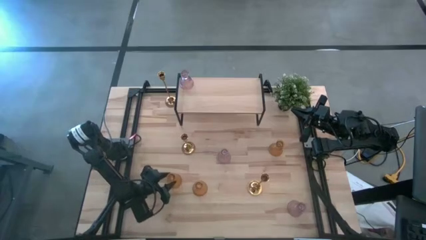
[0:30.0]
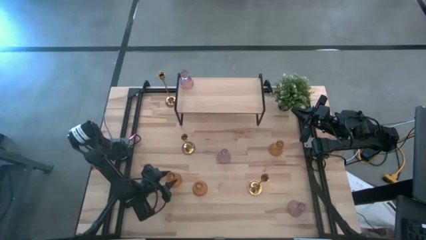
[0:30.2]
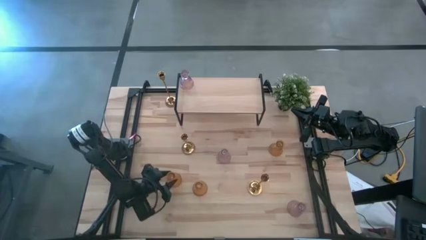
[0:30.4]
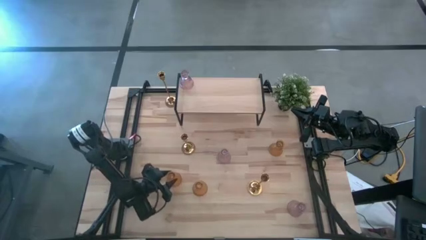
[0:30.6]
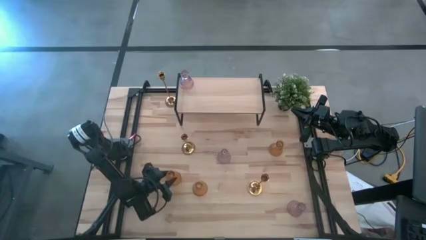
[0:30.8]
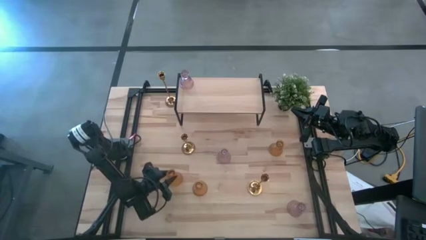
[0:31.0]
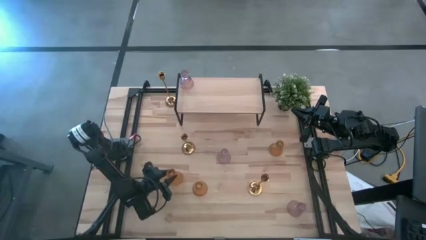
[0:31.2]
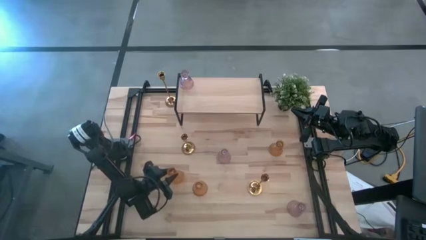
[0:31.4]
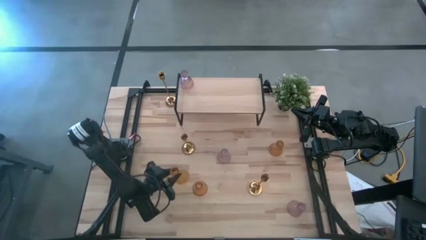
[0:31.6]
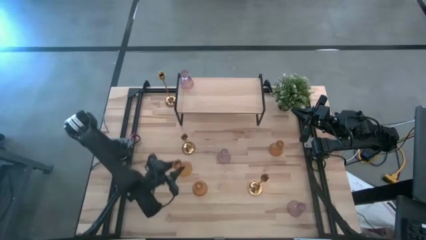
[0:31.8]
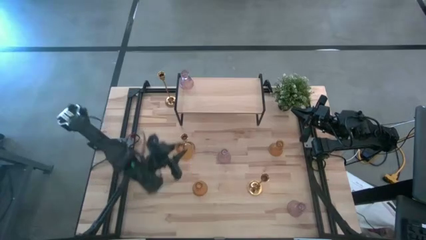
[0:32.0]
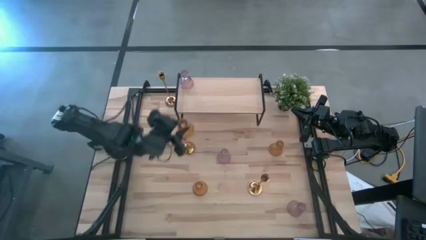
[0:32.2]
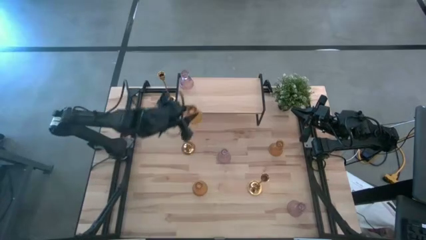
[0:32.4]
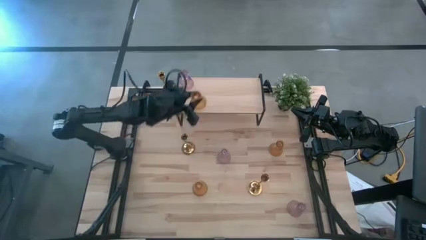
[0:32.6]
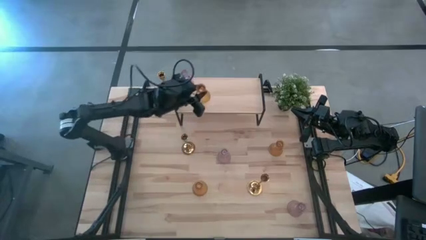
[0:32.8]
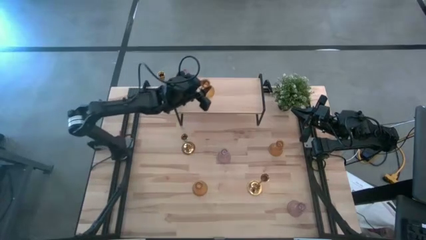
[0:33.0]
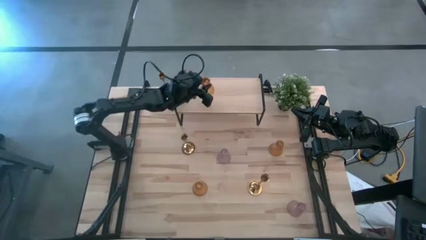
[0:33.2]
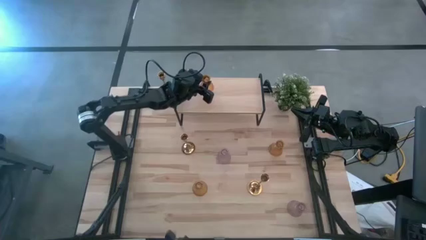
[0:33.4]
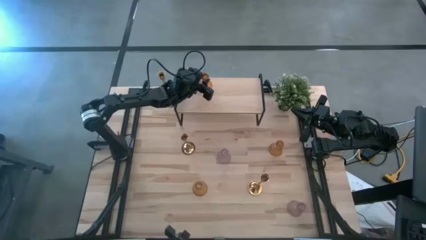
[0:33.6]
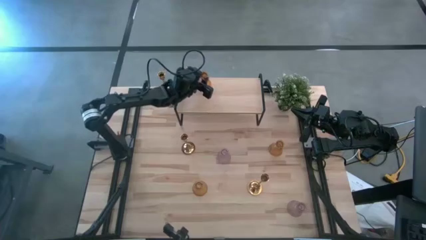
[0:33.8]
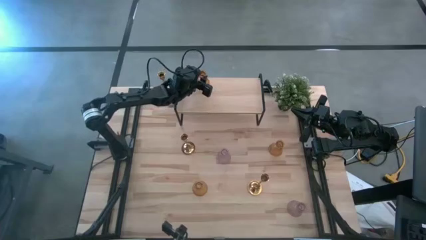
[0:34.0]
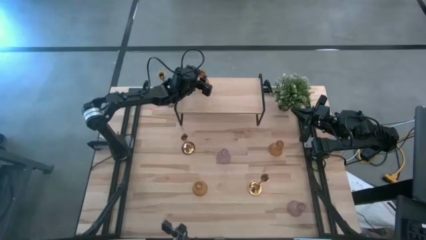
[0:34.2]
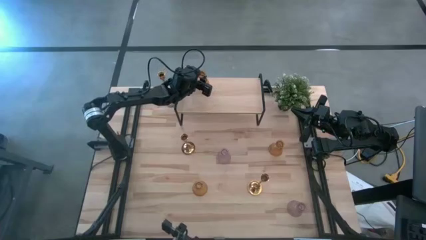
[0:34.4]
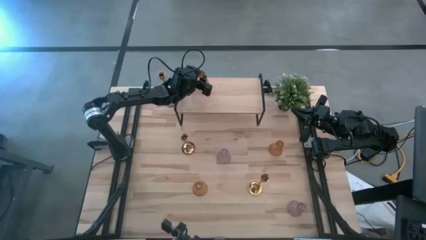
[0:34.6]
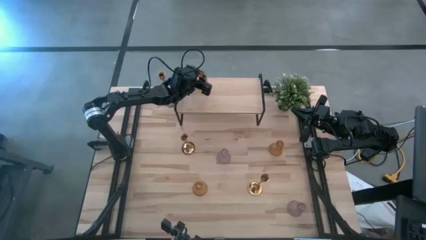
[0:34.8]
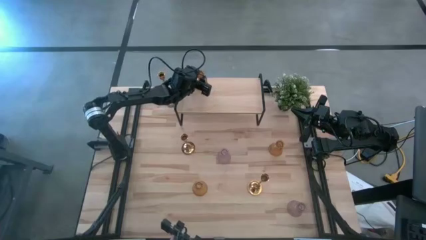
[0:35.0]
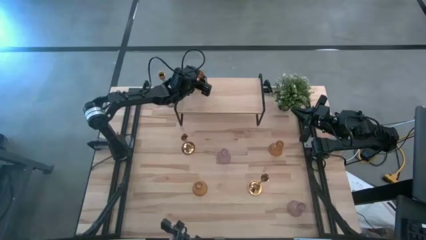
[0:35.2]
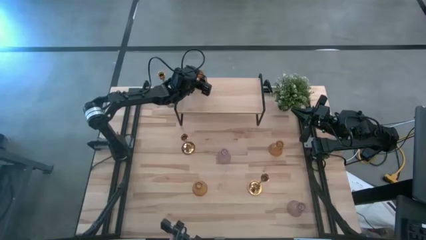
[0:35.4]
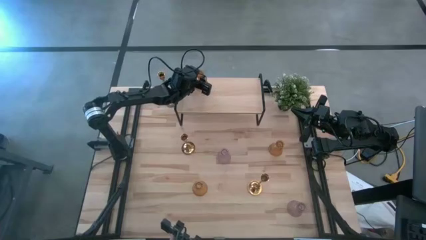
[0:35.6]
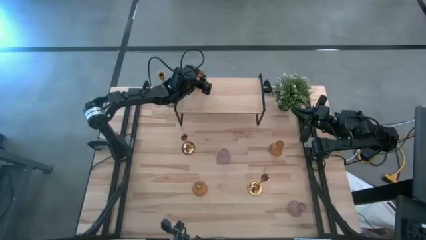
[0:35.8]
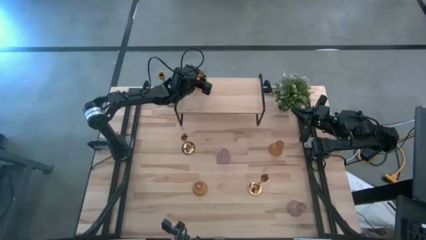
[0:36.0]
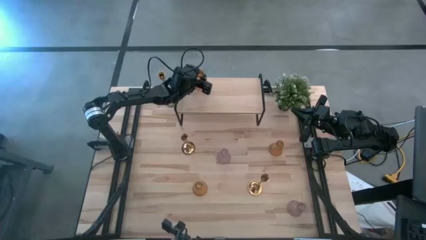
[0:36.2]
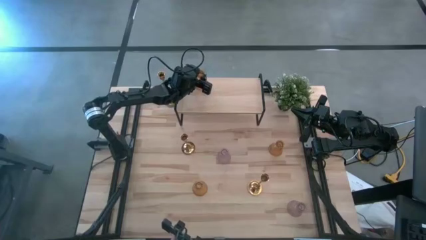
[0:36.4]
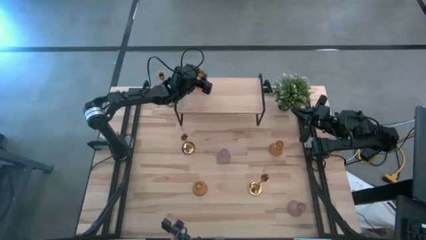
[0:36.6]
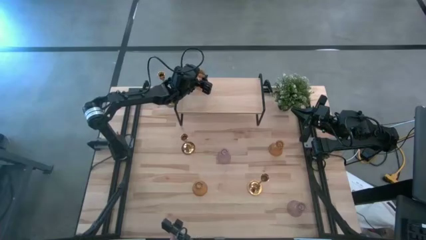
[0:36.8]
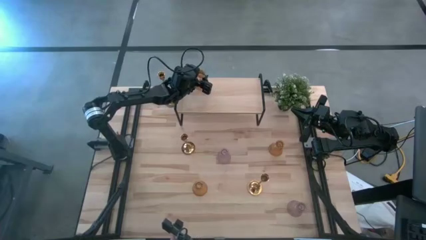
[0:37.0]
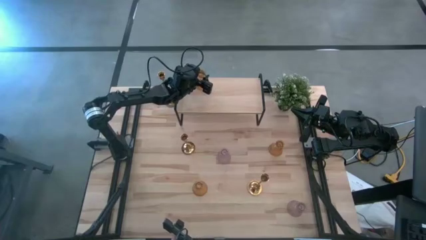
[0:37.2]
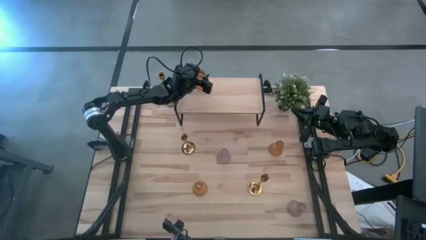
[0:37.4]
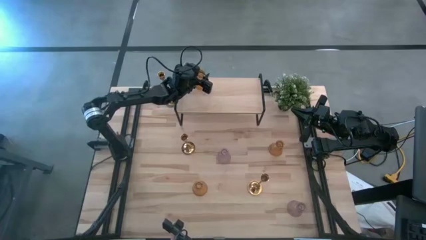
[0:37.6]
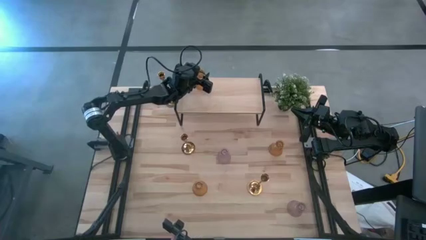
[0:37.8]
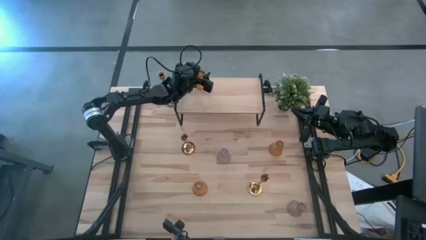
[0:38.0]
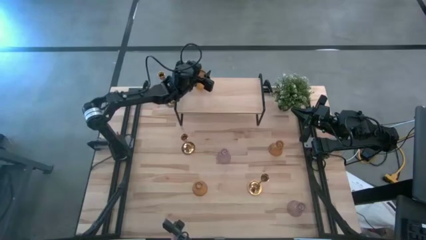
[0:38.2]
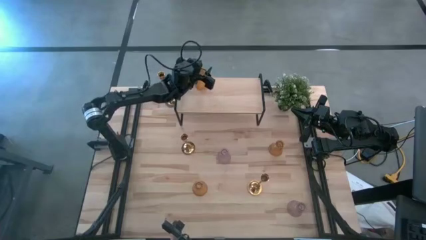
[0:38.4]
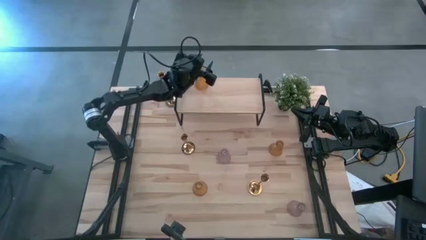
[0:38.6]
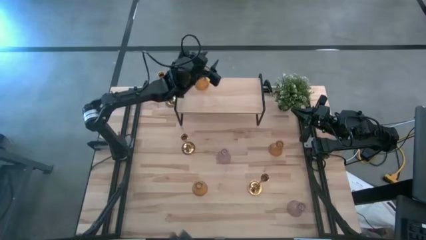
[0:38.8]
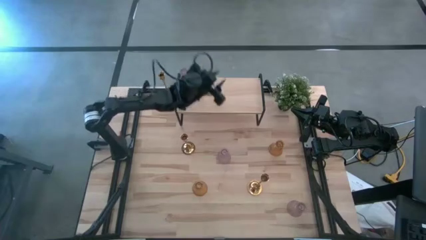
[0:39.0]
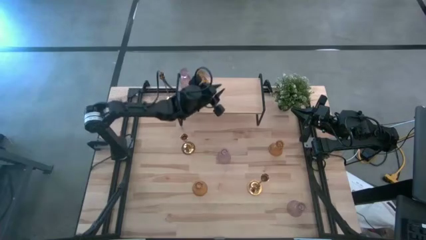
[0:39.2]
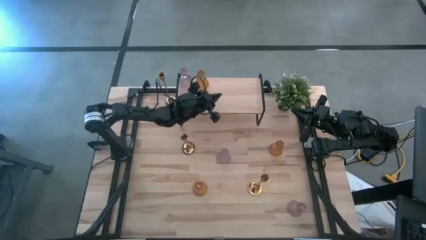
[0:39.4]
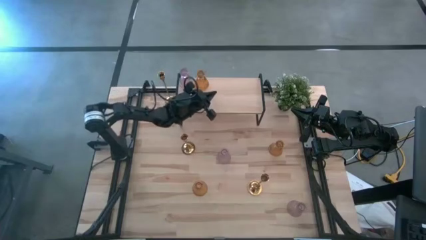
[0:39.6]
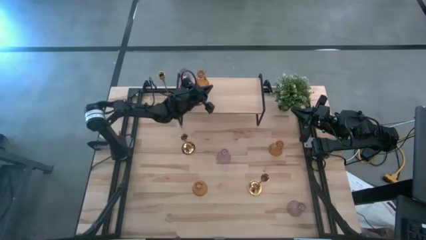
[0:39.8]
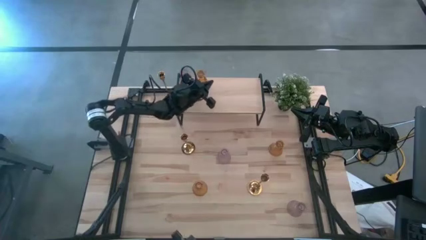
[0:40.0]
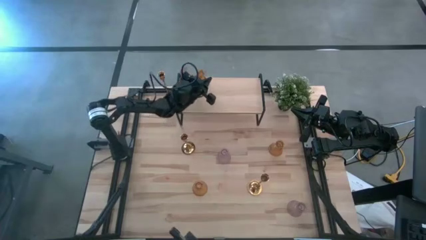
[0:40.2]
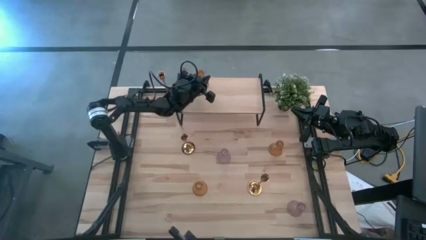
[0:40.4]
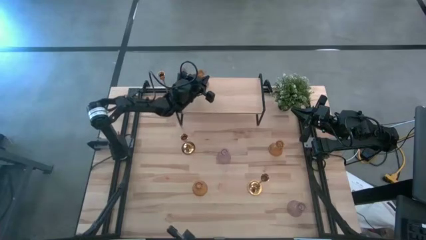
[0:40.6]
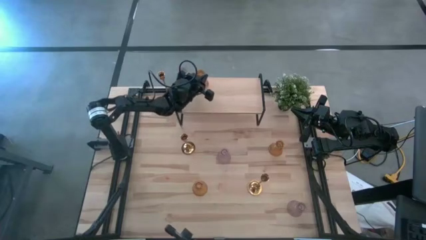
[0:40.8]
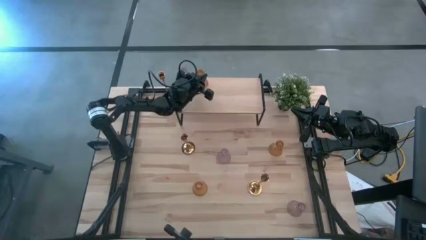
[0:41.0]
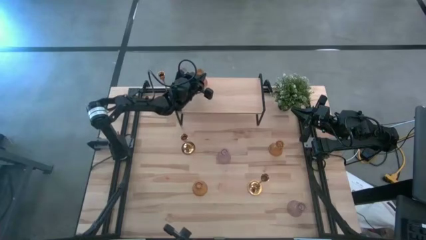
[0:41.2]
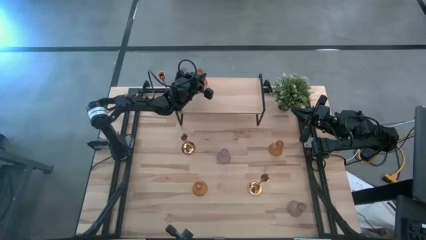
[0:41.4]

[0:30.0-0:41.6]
Task: Pick & Place candle stick holders
Put the bottom left yellow glass candle holder on the shelf aligned with the other glass candle holder
